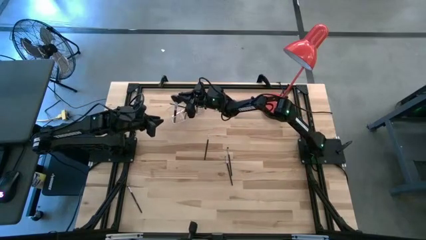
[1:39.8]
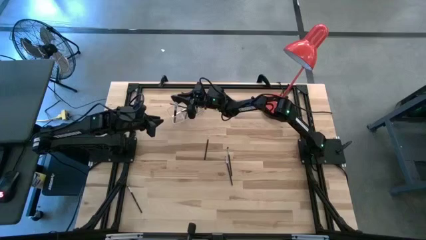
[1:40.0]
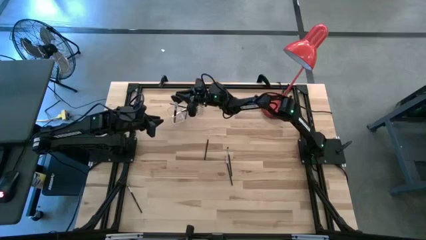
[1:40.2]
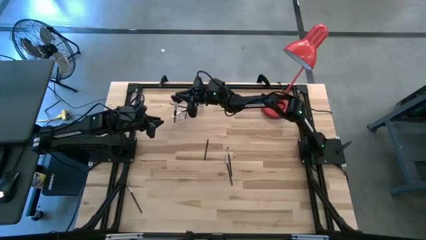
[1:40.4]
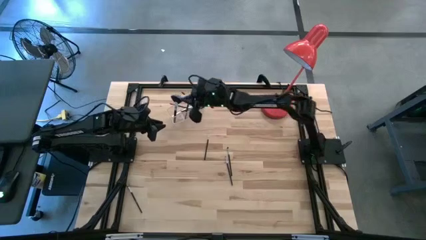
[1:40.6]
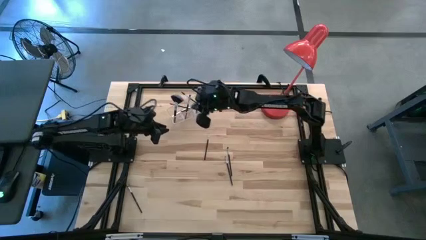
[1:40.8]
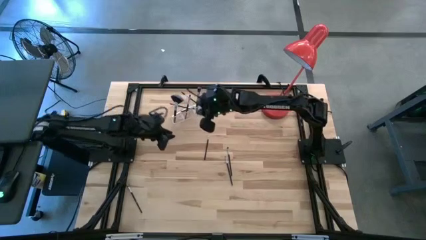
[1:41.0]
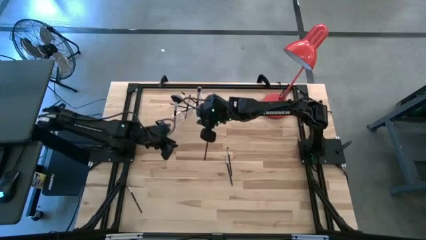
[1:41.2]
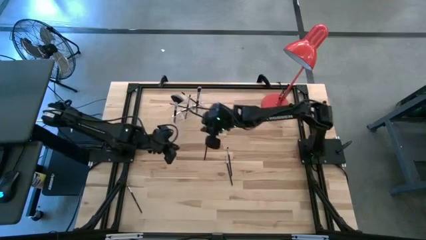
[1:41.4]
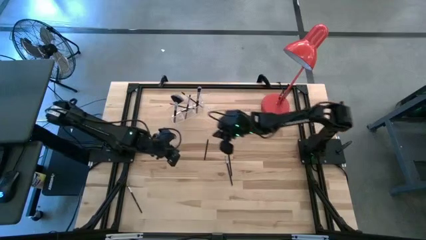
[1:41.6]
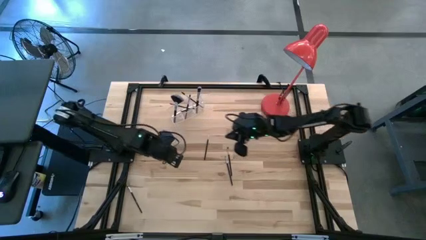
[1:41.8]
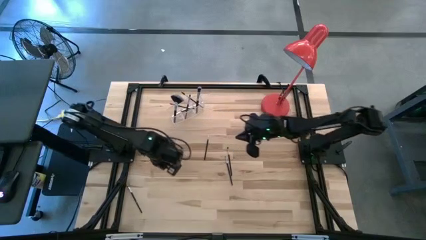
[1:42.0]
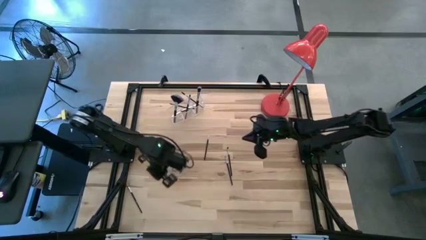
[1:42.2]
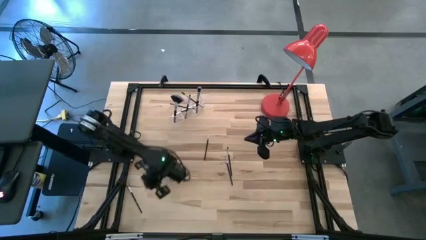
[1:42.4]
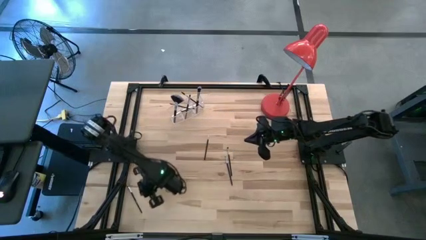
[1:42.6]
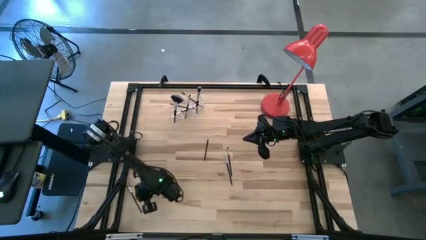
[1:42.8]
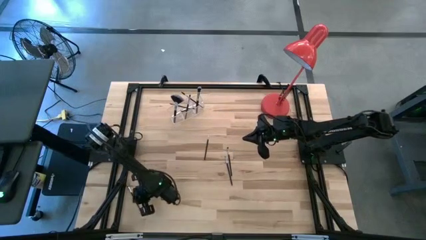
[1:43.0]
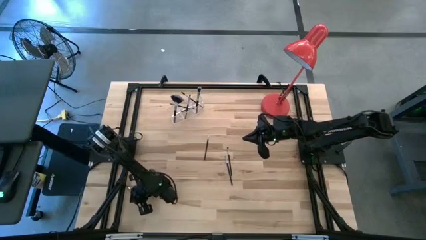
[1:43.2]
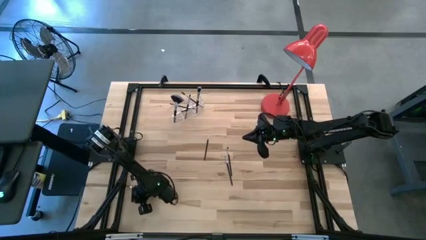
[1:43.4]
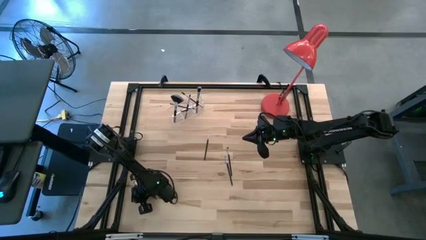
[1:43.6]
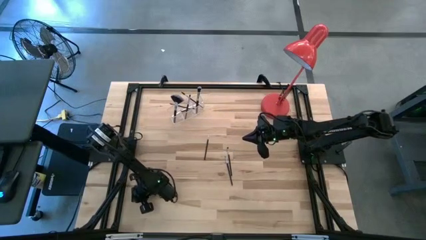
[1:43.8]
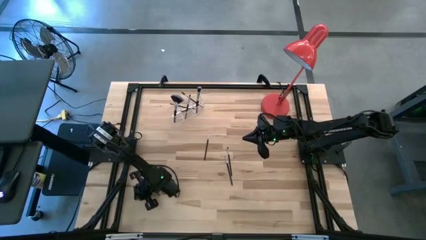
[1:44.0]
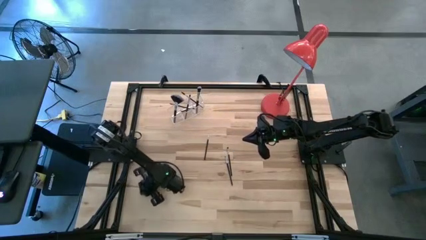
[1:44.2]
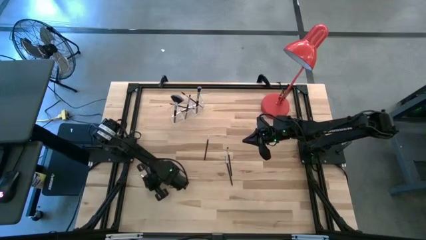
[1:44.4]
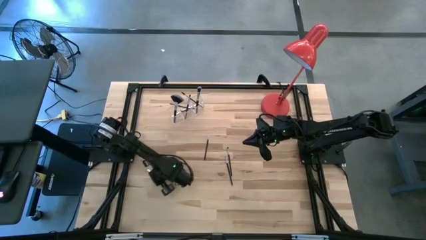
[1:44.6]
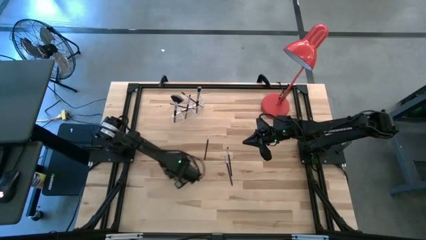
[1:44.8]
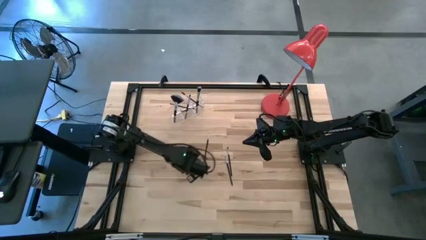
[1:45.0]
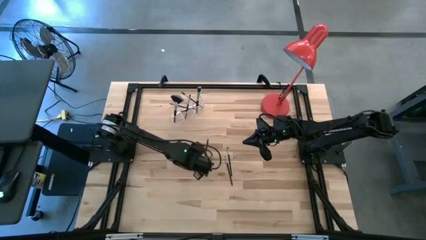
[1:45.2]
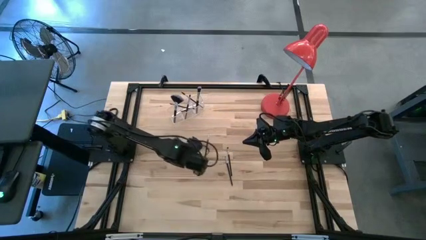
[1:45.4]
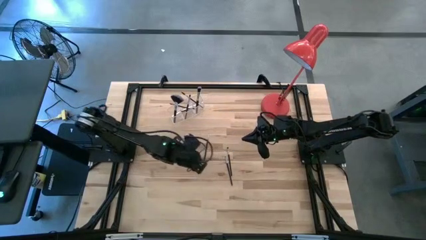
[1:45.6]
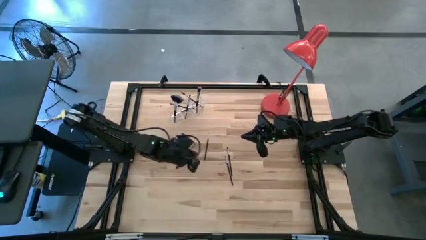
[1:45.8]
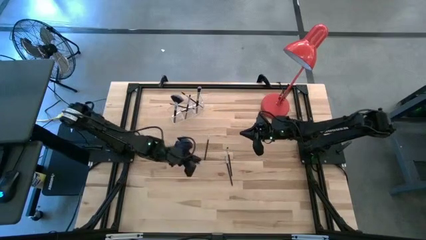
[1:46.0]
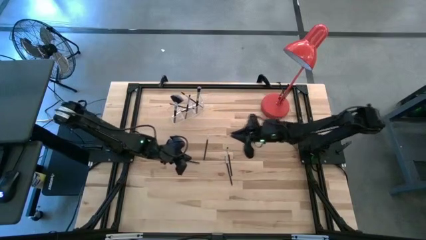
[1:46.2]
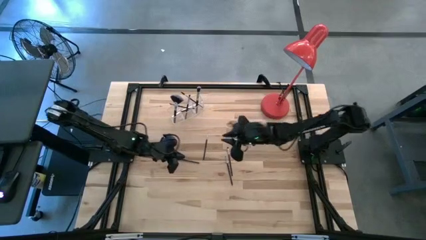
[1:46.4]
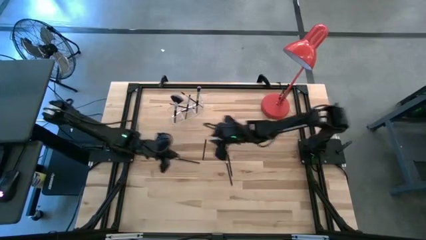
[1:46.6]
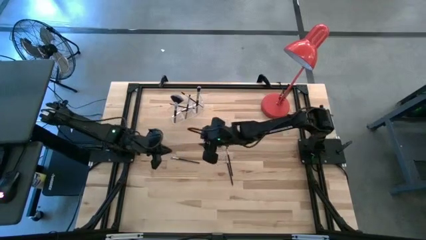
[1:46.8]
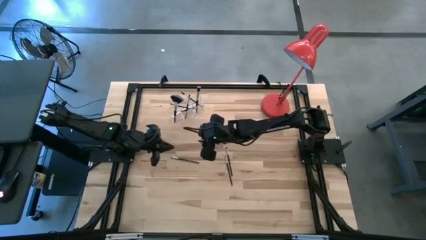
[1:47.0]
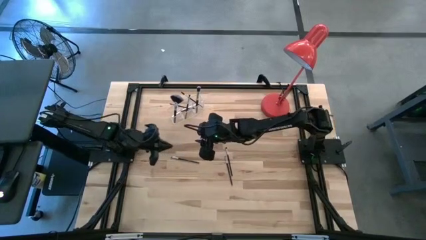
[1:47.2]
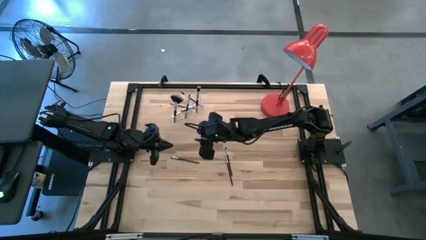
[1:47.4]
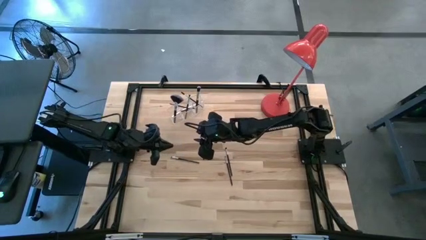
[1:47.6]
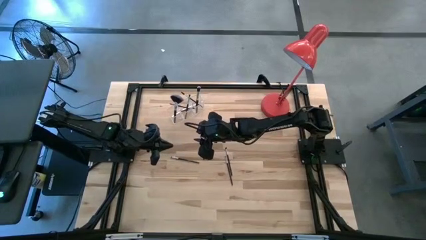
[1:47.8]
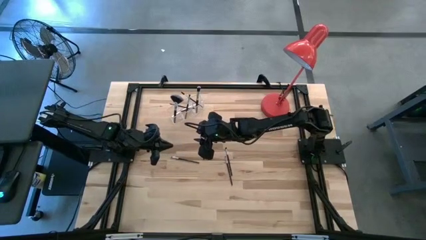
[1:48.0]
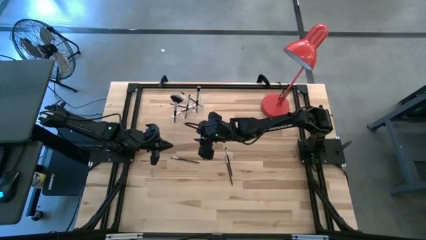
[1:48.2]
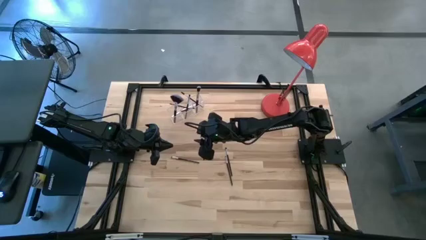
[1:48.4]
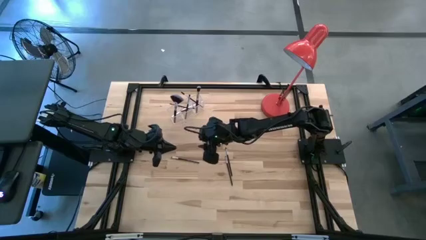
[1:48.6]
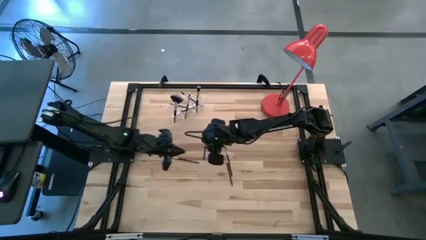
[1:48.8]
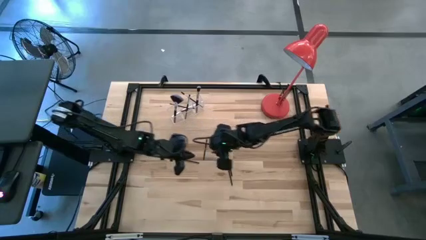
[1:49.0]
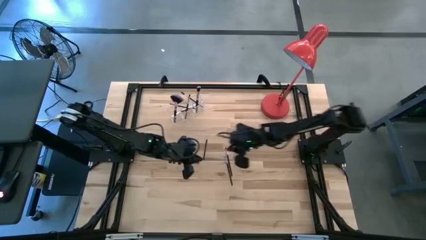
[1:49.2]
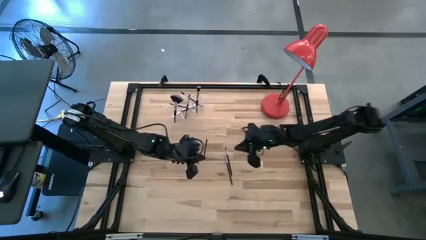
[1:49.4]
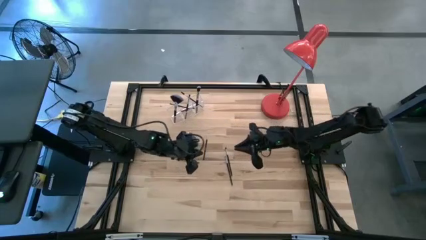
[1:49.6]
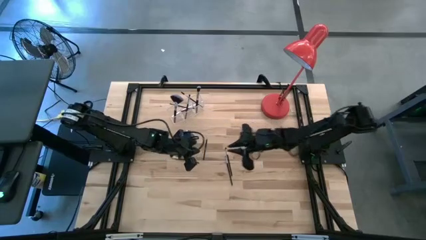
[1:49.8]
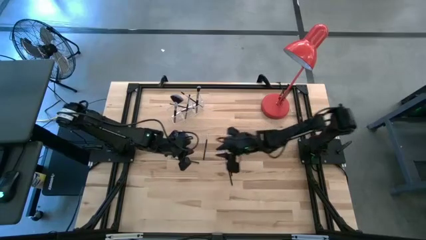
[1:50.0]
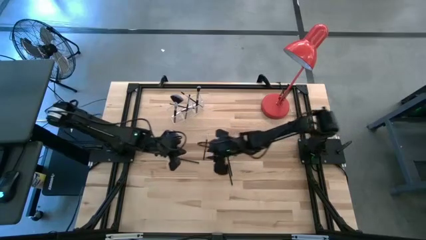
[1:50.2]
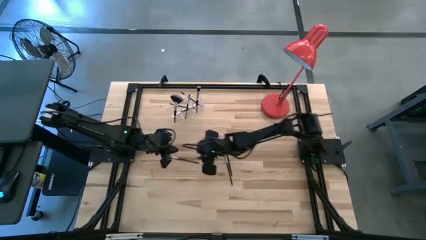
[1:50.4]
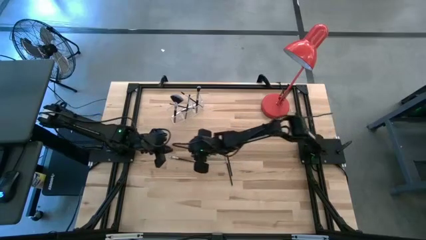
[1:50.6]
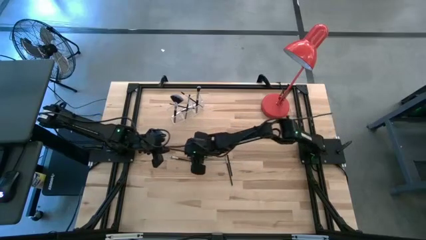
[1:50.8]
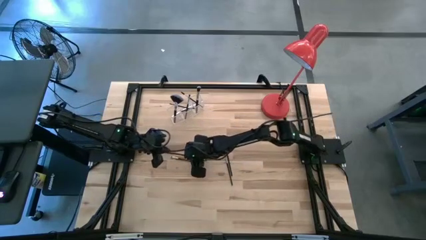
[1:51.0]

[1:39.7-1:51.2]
Task: Put items in baskets/containers
Put the eyeshadow brush into the transparent organizer

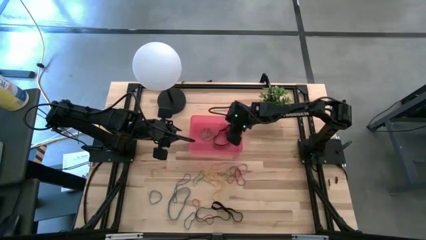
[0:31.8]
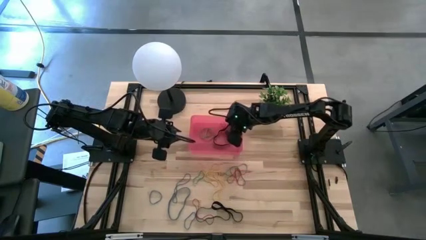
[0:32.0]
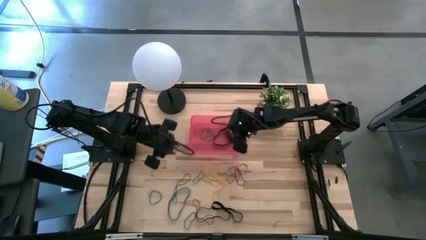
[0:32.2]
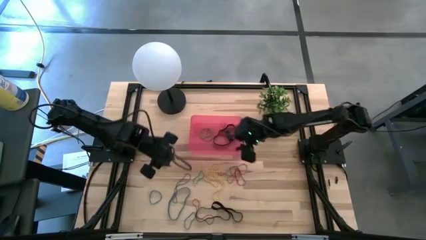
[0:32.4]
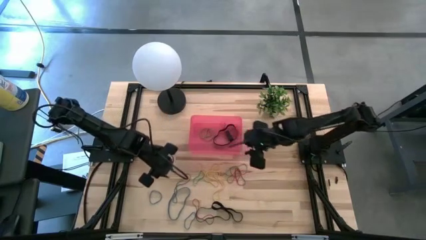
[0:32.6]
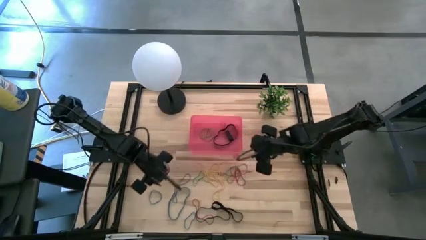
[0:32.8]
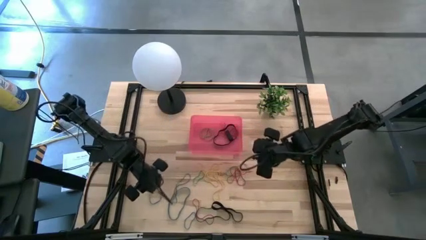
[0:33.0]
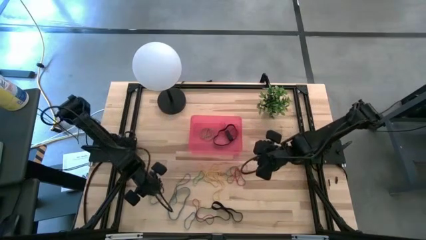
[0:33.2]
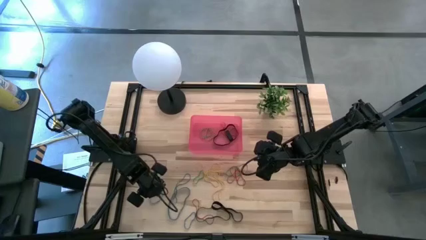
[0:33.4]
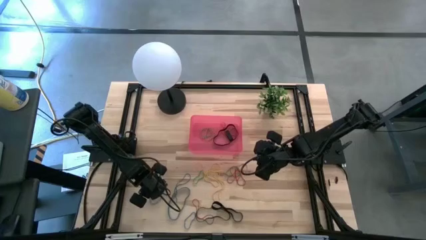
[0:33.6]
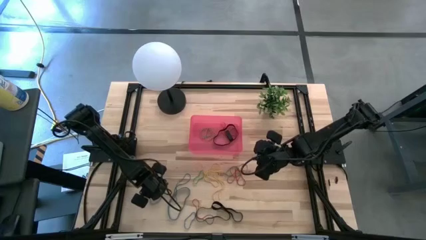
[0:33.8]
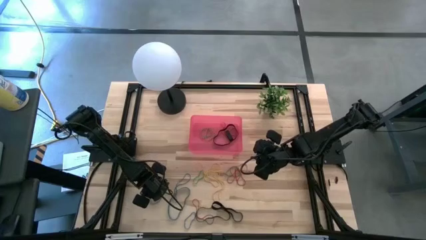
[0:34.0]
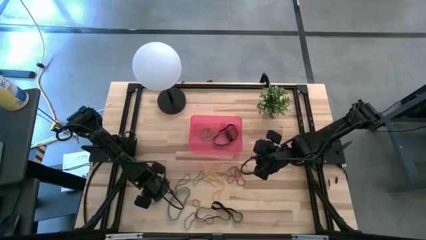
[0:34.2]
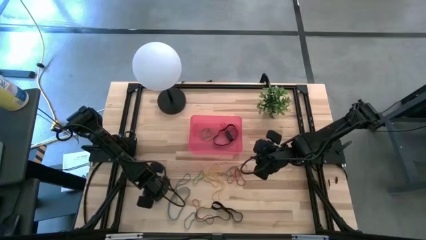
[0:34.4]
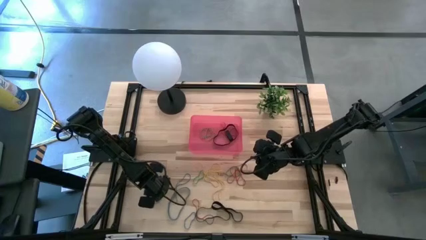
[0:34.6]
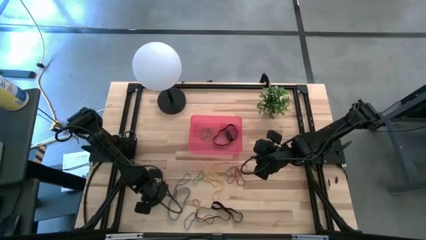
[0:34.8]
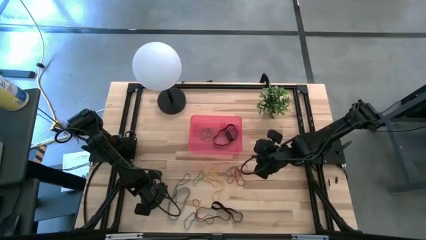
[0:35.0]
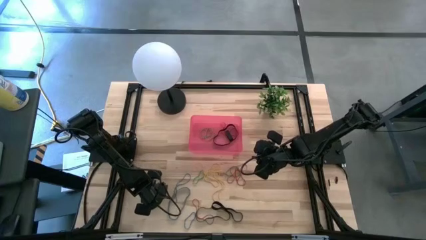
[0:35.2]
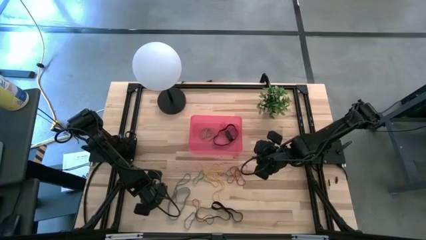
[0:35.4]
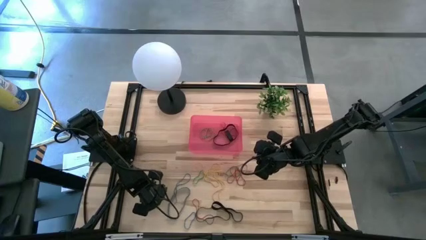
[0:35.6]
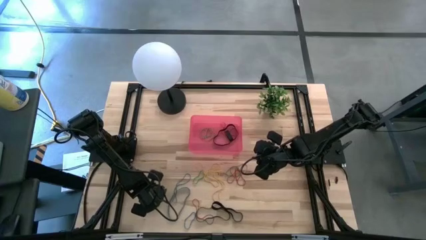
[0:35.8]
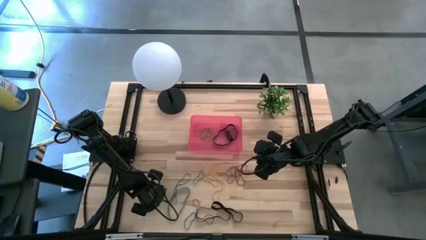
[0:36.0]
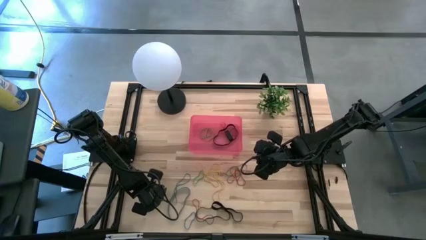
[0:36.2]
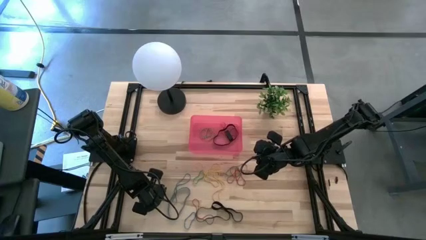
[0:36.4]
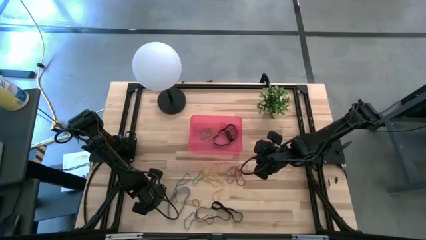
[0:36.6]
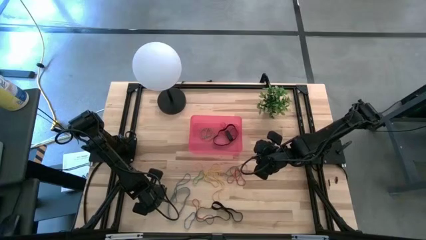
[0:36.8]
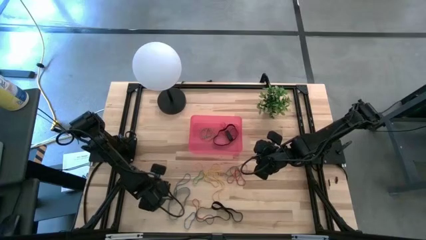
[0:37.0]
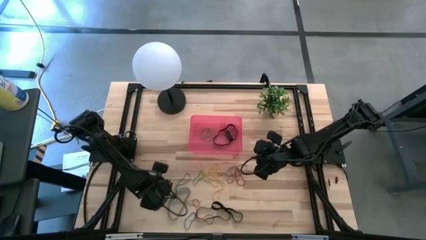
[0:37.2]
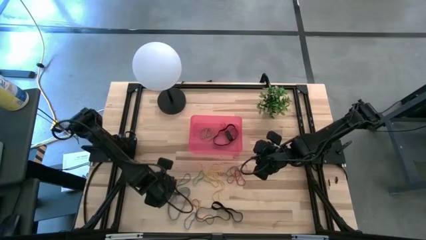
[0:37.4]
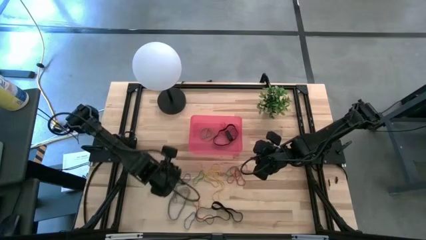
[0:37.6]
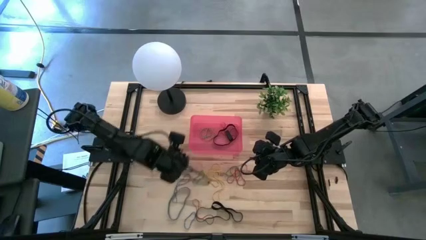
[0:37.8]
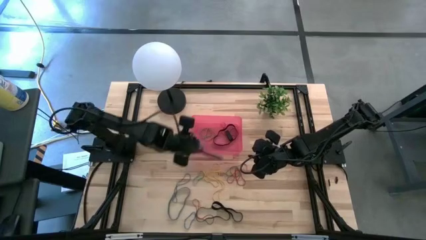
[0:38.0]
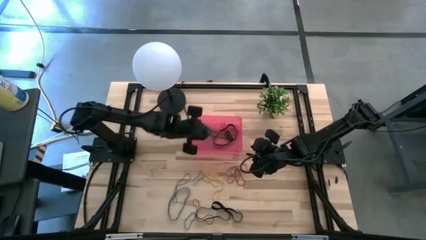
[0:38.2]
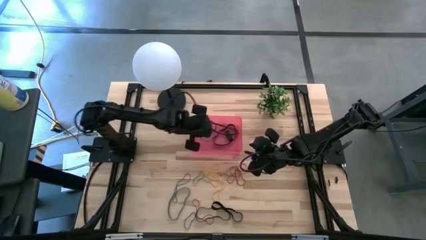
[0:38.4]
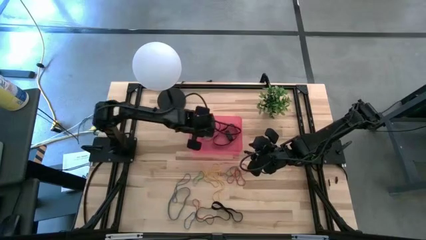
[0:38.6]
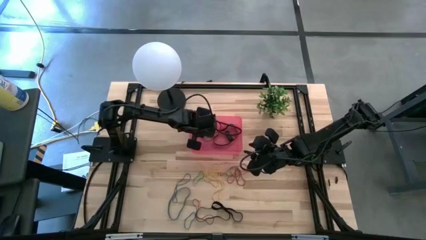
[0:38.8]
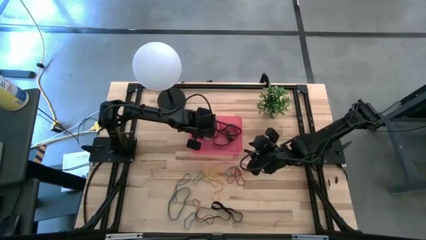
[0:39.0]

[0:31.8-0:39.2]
Task: Pick and place rubber bands into bin
Put the blue rubber band into the red bin
